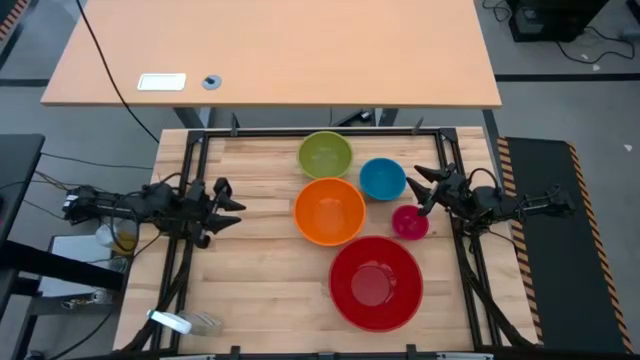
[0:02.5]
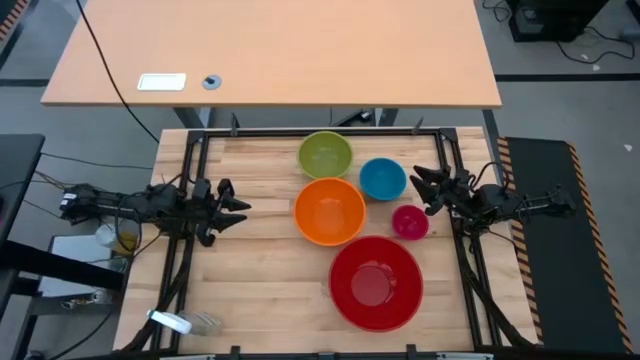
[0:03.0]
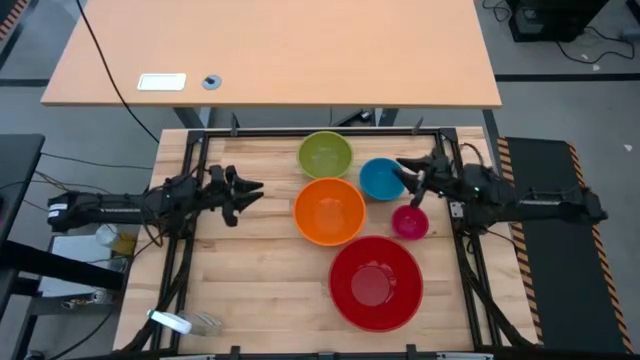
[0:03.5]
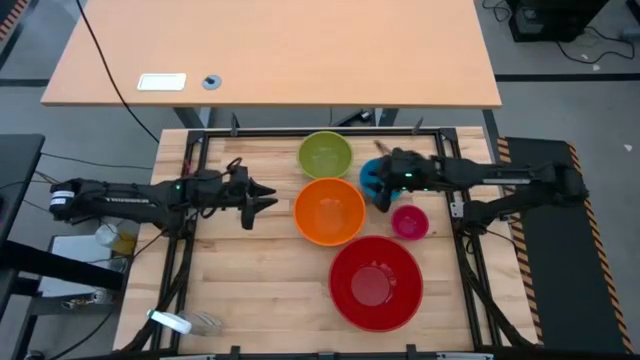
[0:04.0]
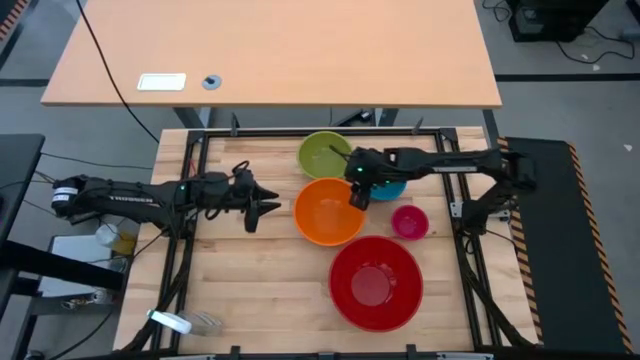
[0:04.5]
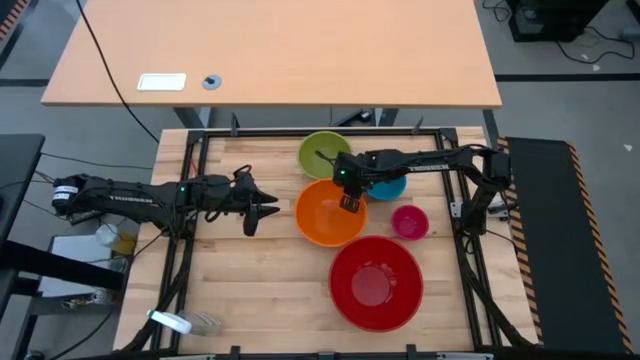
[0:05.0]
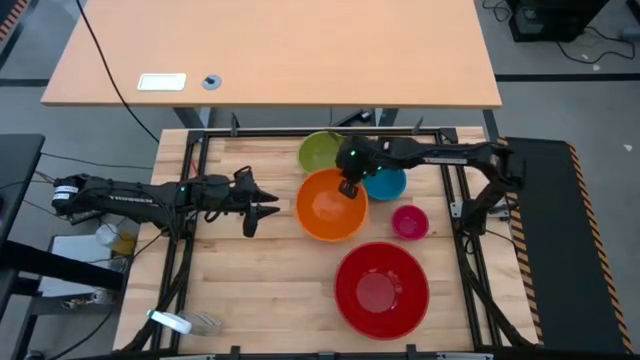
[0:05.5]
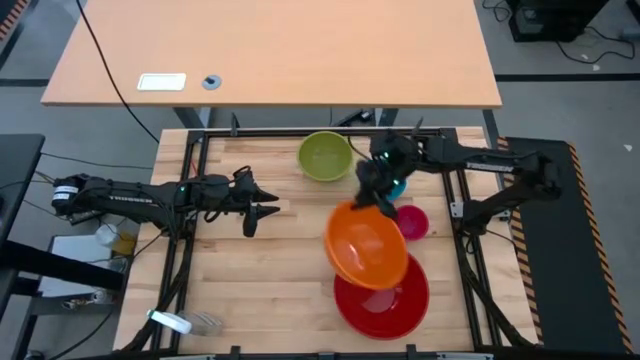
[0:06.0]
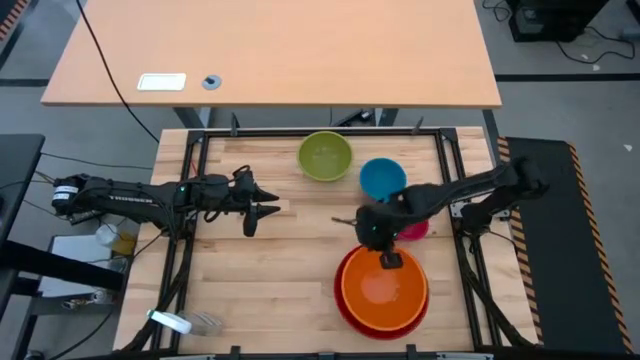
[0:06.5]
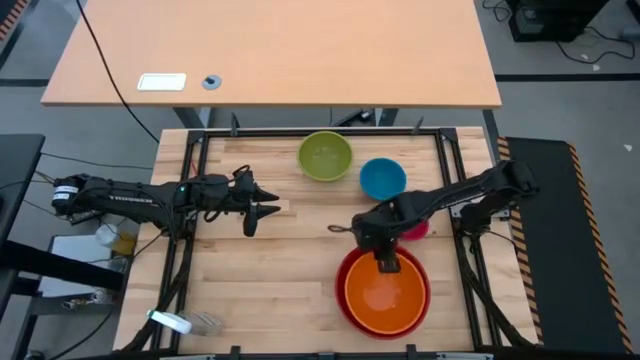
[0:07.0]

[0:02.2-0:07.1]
Stack the orange bowl into the red bowl

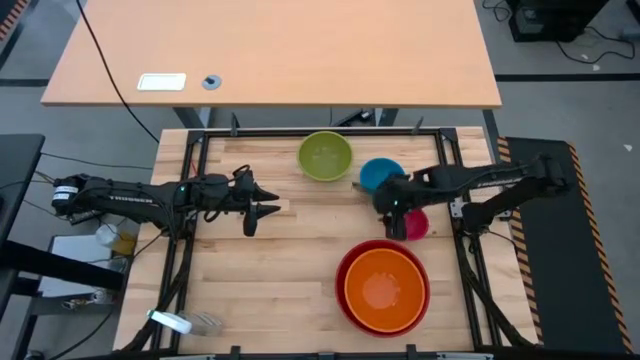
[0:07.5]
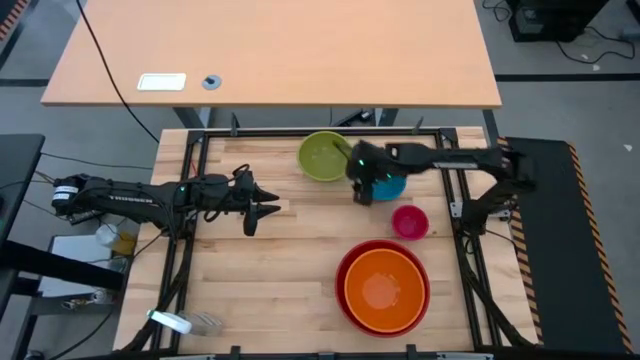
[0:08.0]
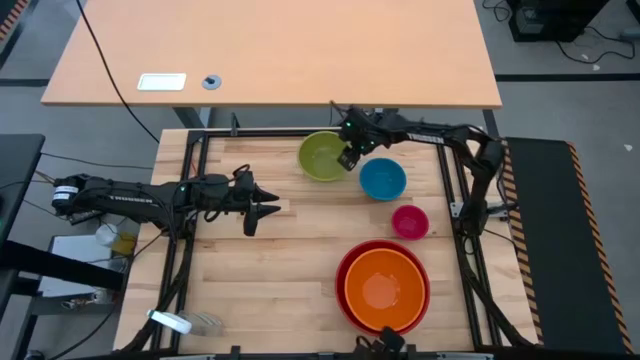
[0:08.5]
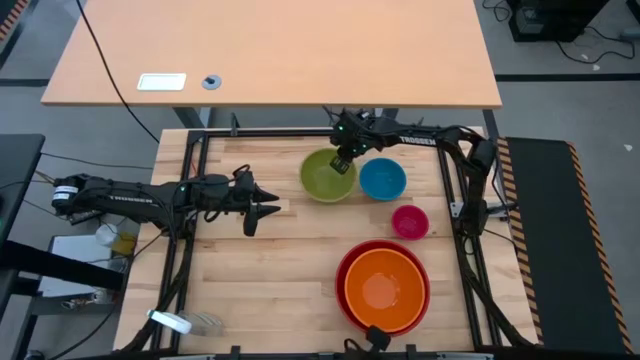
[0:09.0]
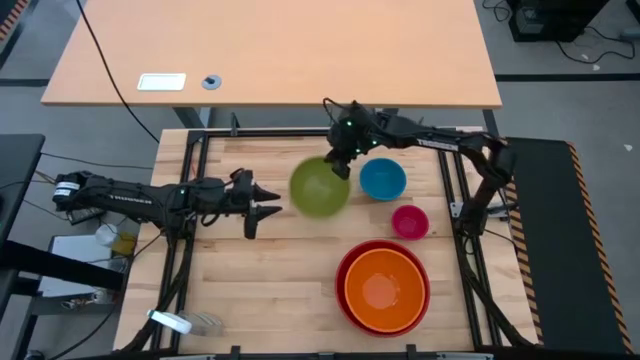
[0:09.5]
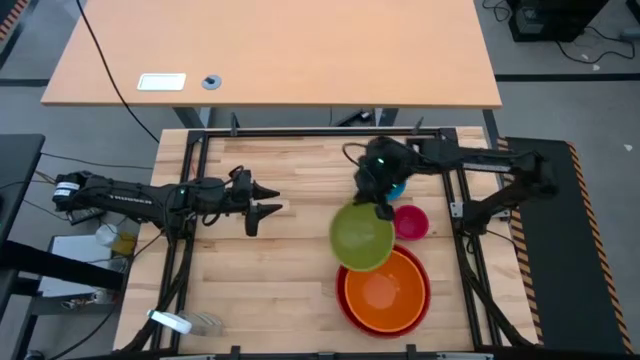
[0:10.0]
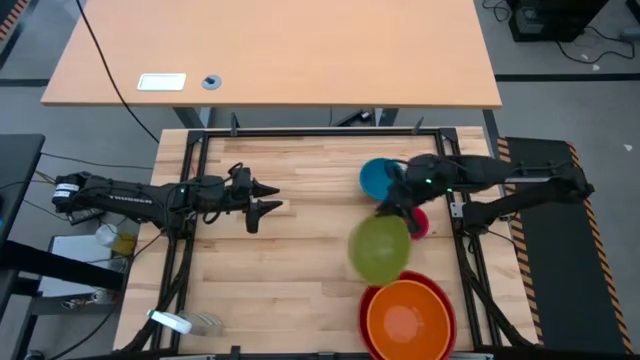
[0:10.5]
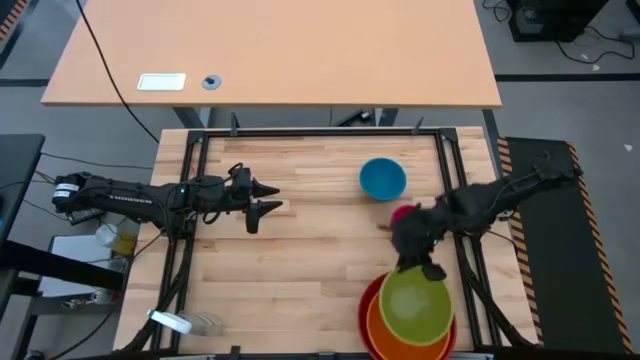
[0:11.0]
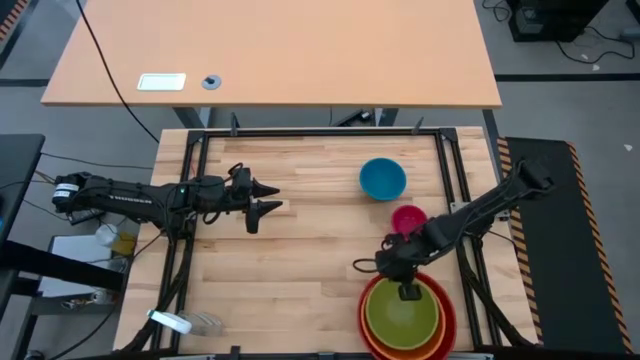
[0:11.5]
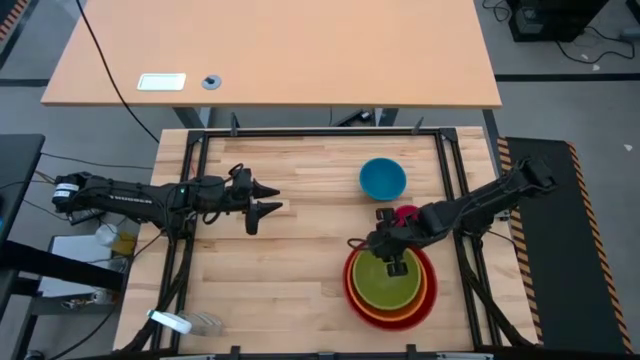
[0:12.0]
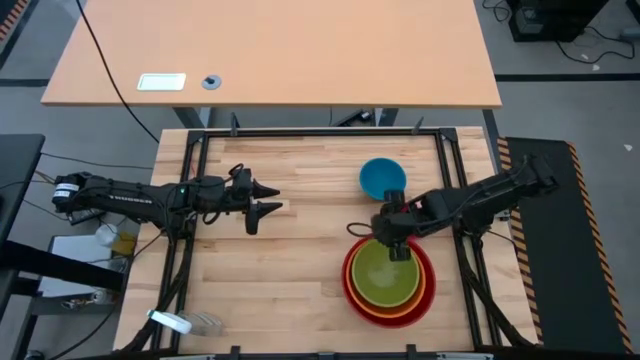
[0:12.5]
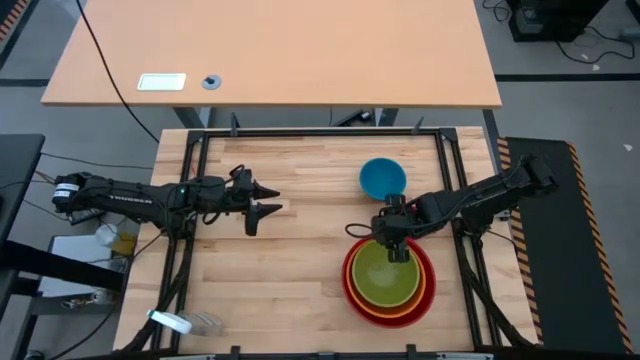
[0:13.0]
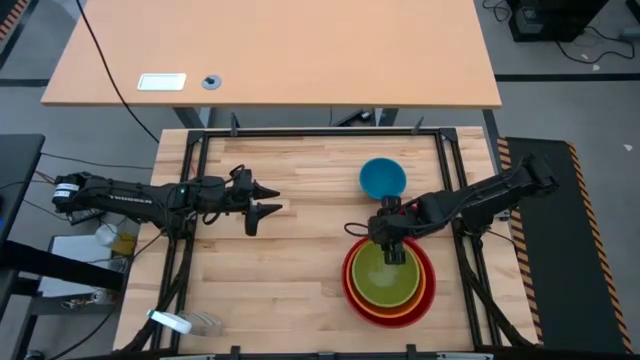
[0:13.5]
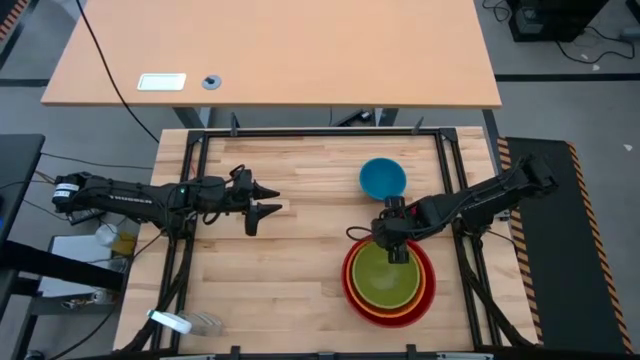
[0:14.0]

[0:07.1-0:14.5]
Stack the green bowl into the orange bowl

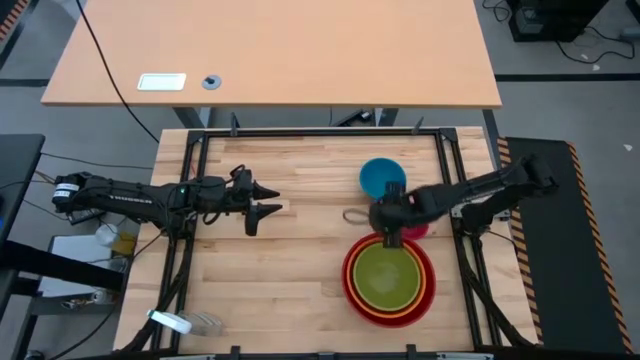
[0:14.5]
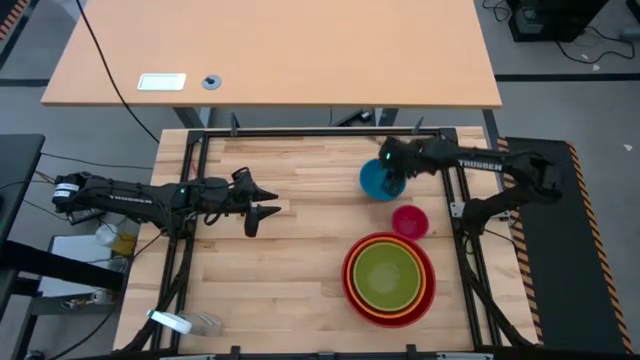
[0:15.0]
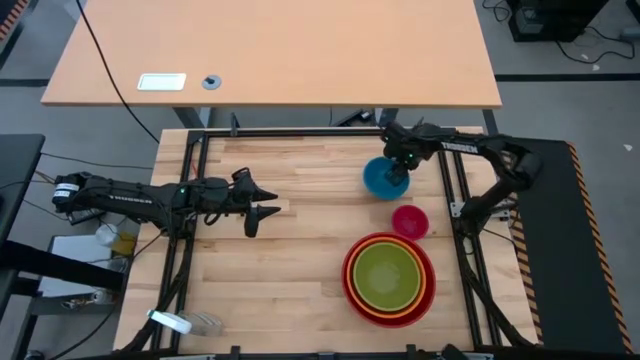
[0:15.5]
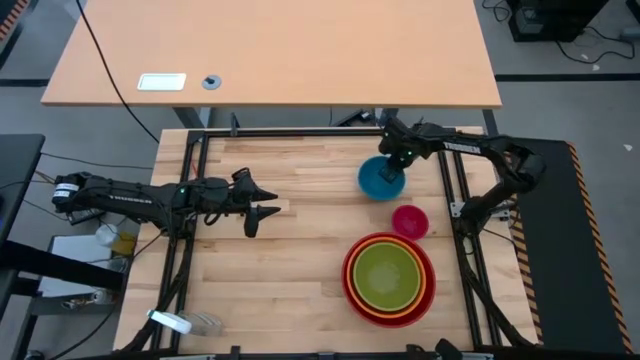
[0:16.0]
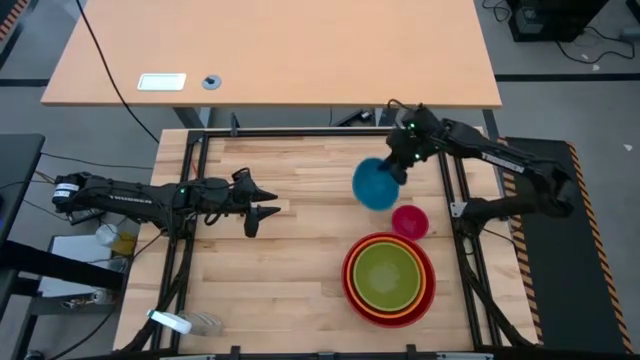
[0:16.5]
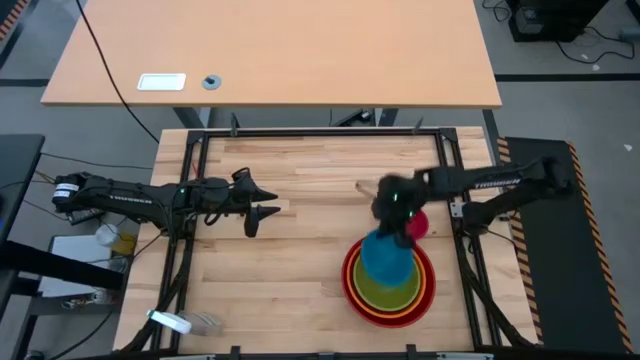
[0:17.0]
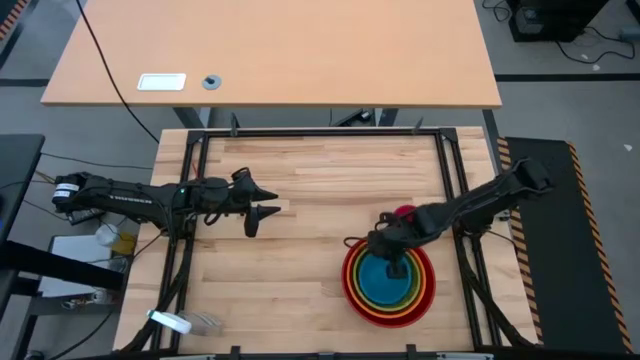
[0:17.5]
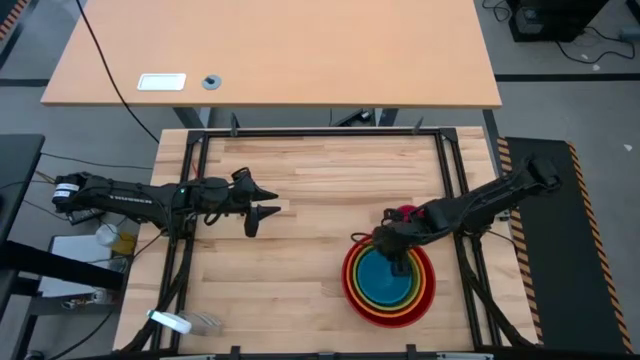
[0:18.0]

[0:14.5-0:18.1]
Stack the blue bowl into the green bowl

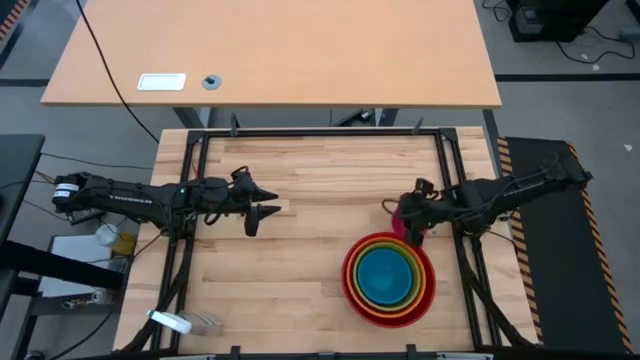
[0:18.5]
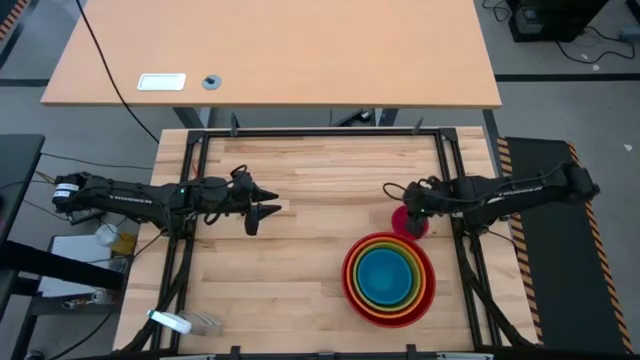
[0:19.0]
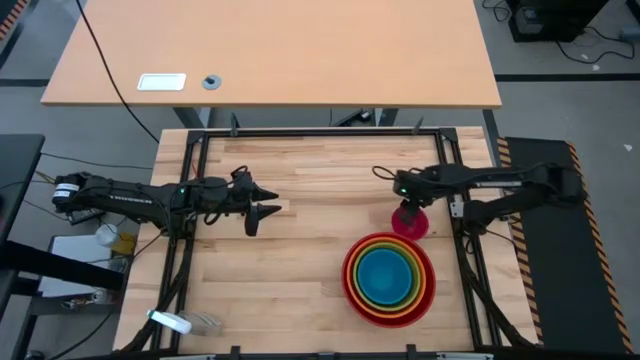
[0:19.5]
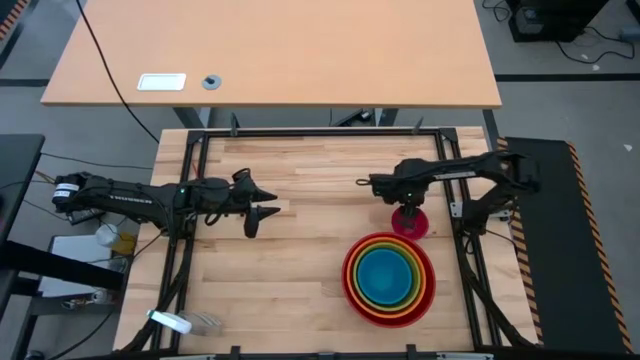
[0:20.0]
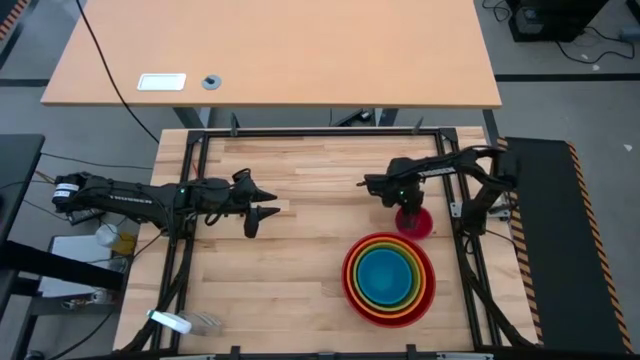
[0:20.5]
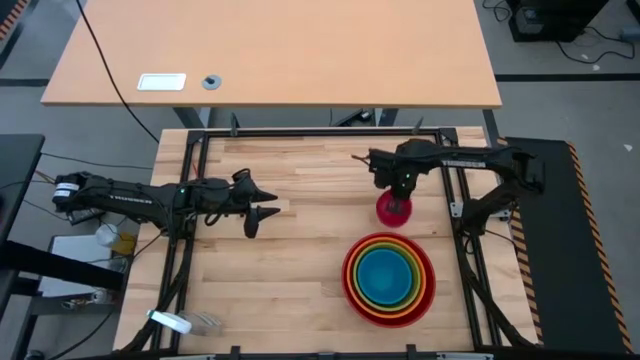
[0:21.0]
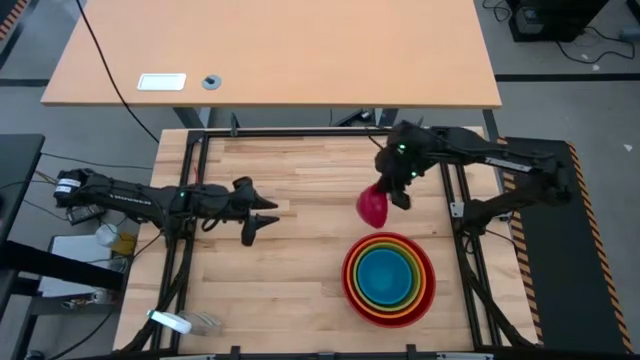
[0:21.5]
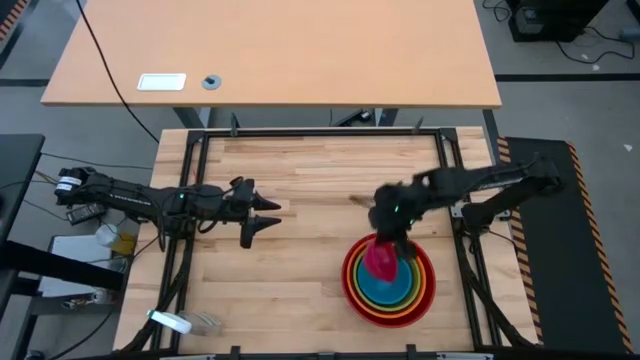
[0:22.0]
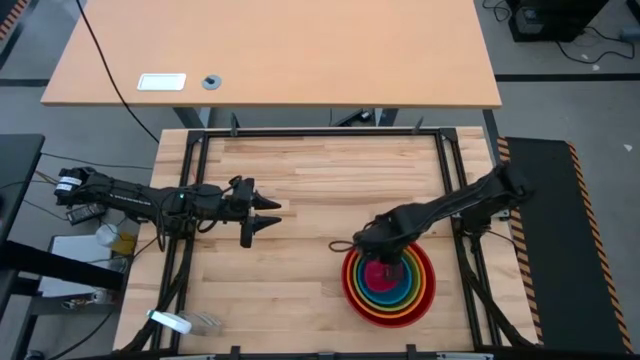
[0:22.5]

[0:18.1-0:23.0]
Stack the small pink bowl into the blue bowl
